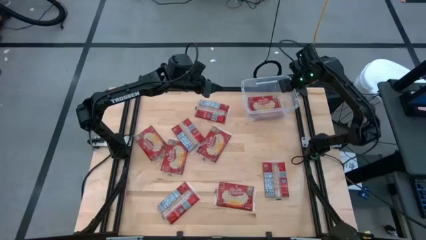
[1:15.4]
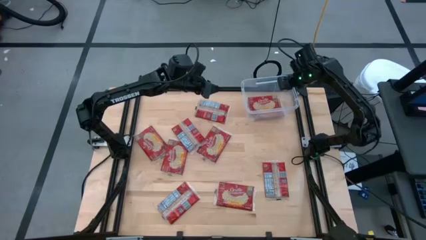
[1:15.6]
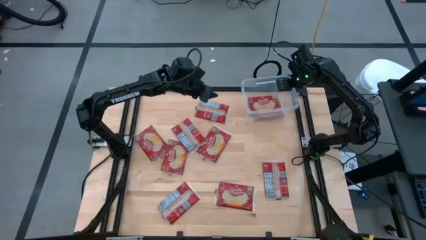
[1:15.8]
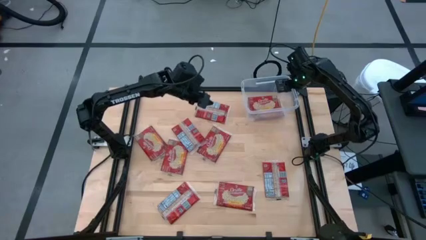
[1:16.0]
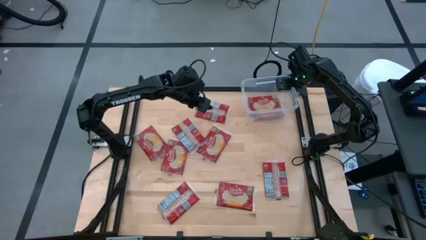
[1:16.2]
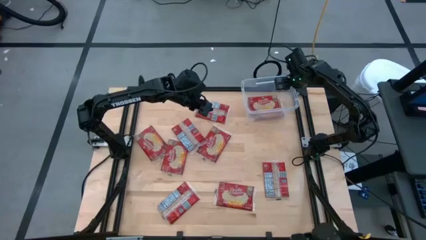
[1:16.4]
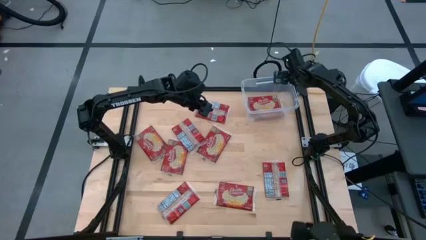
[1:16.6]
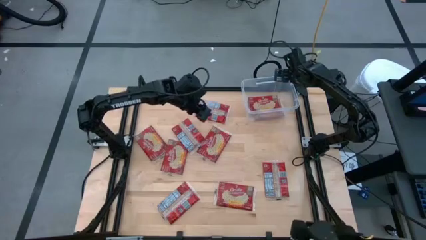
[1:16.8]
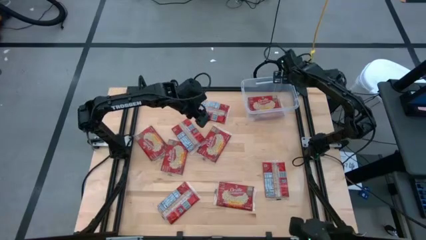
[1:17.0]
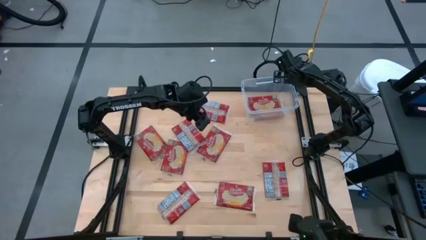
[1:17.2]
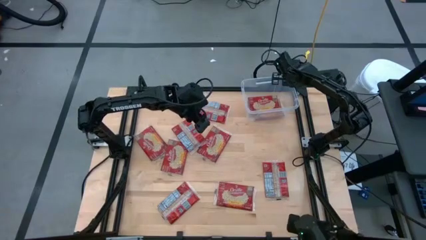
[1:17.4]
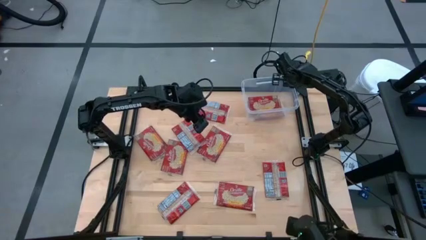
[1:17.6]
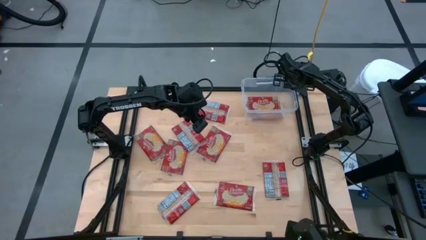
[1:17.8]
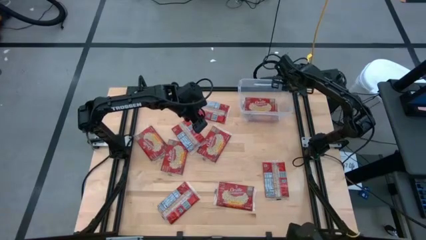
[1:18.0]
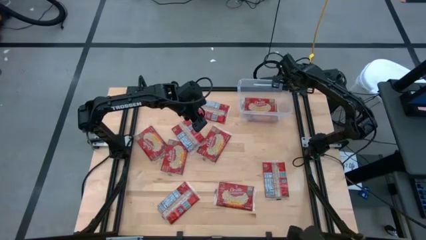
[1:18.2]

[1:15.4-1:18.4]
Task: Sort popcorn bags into baskets
Adjust the transparent container

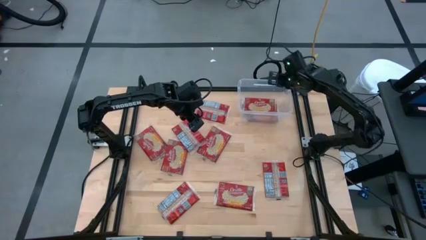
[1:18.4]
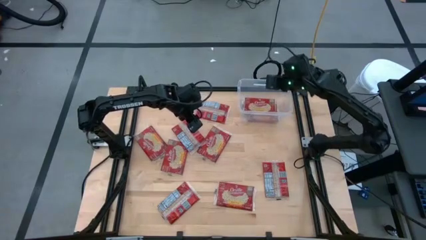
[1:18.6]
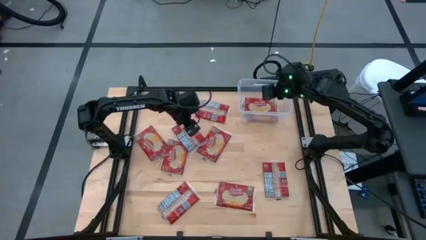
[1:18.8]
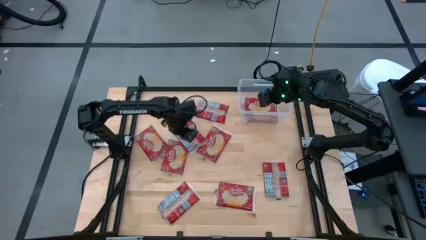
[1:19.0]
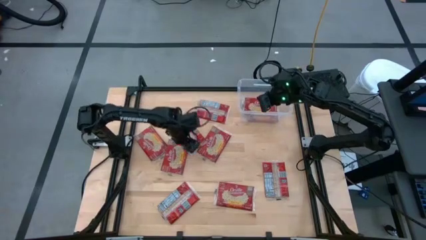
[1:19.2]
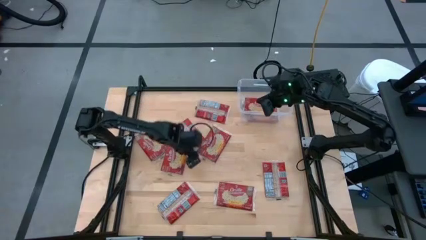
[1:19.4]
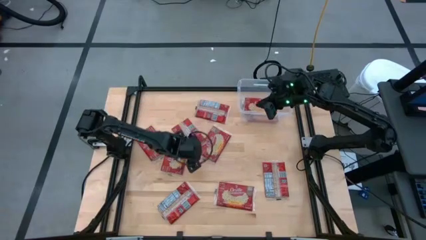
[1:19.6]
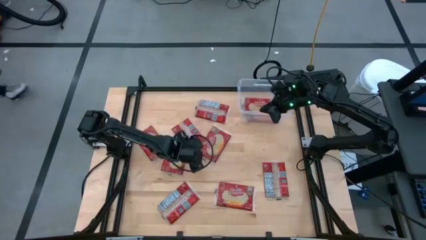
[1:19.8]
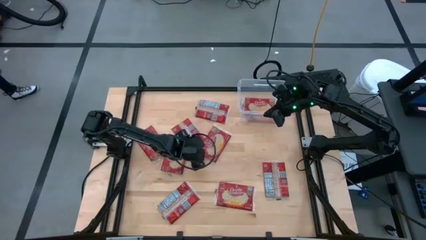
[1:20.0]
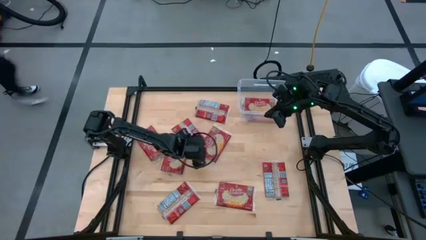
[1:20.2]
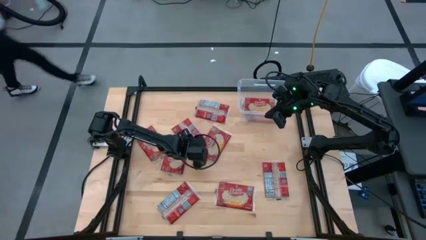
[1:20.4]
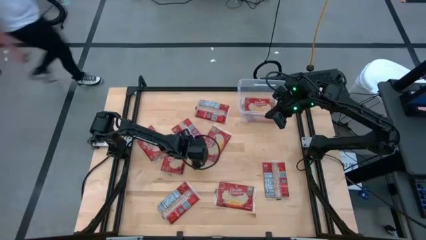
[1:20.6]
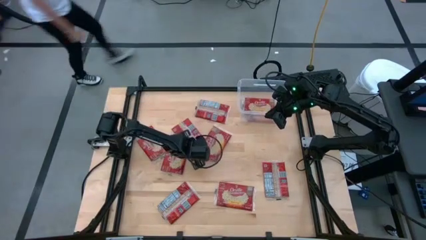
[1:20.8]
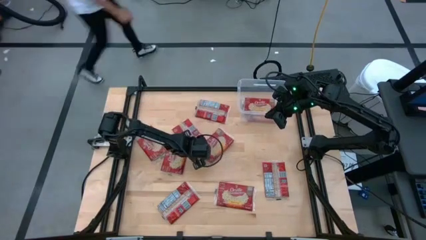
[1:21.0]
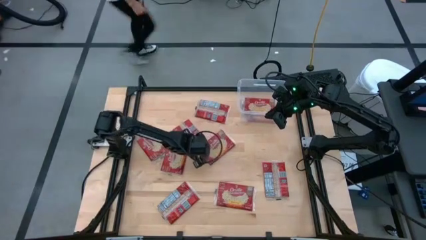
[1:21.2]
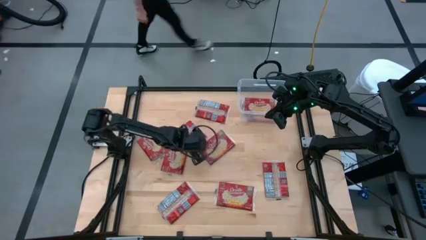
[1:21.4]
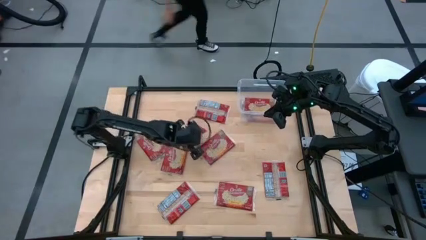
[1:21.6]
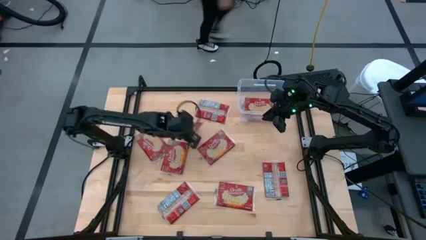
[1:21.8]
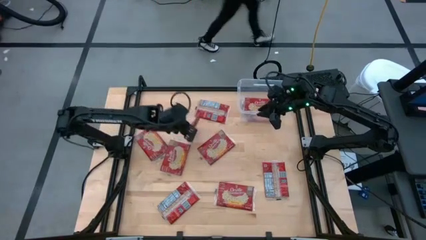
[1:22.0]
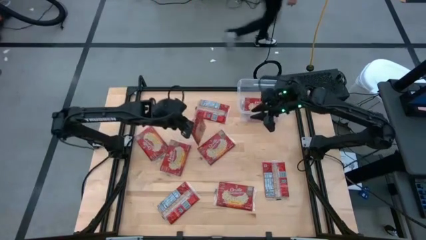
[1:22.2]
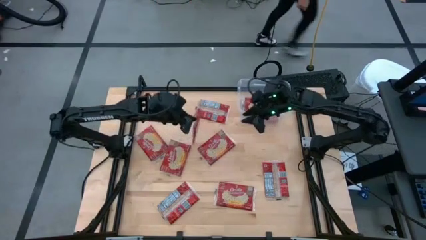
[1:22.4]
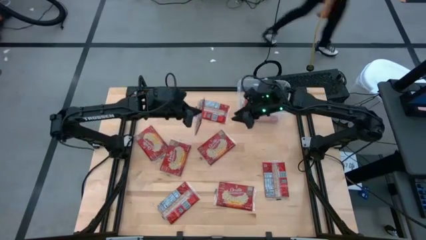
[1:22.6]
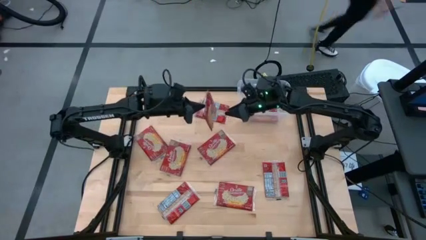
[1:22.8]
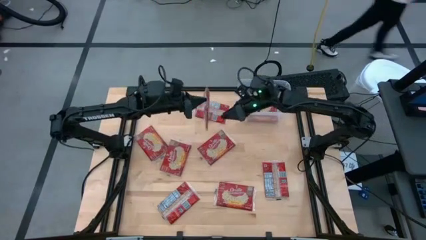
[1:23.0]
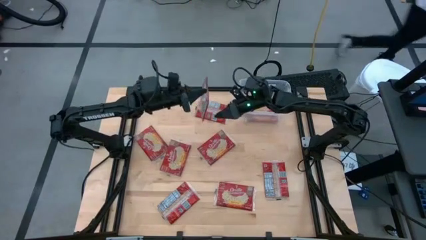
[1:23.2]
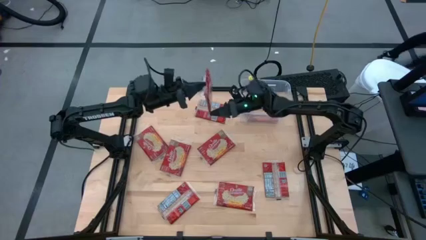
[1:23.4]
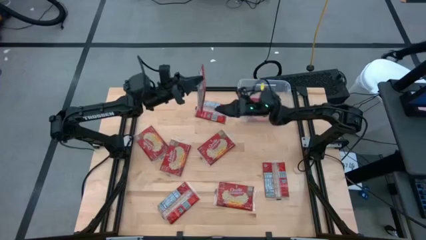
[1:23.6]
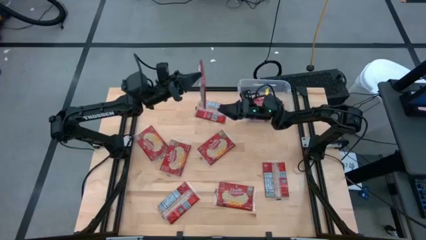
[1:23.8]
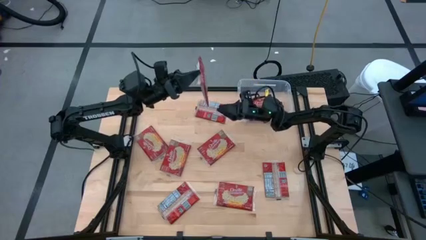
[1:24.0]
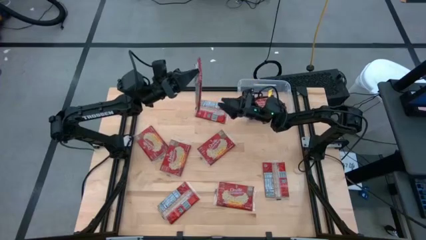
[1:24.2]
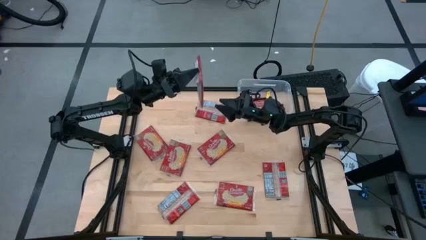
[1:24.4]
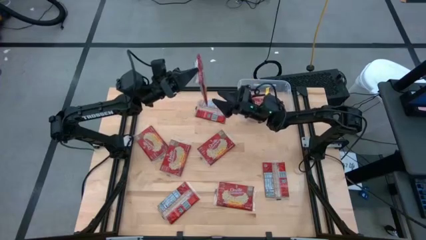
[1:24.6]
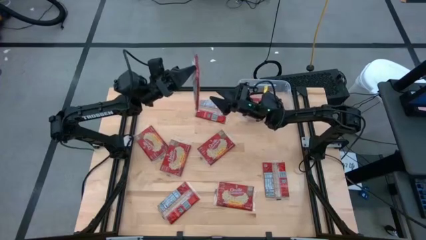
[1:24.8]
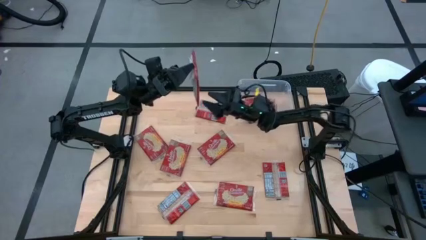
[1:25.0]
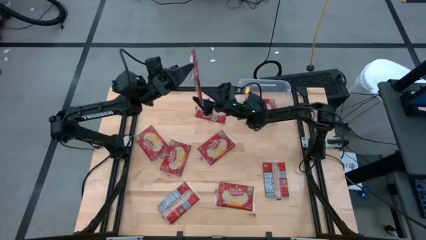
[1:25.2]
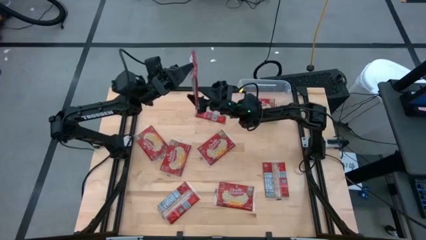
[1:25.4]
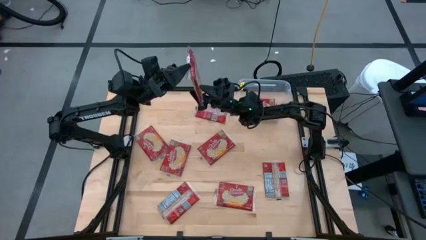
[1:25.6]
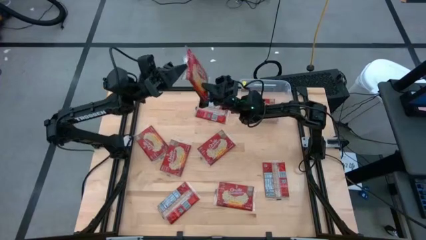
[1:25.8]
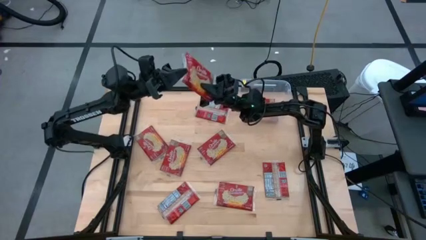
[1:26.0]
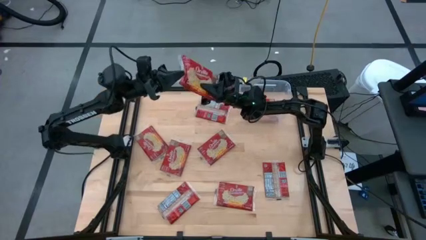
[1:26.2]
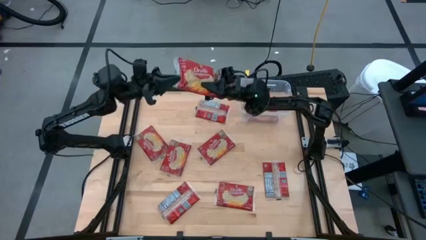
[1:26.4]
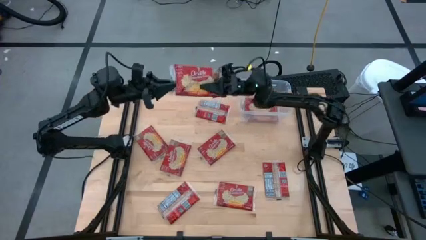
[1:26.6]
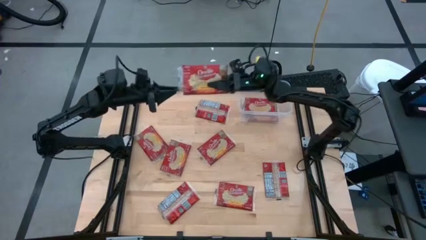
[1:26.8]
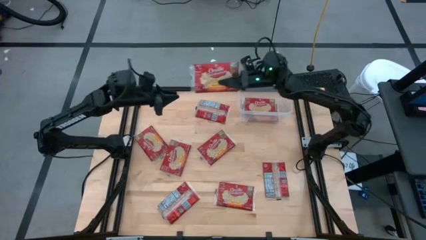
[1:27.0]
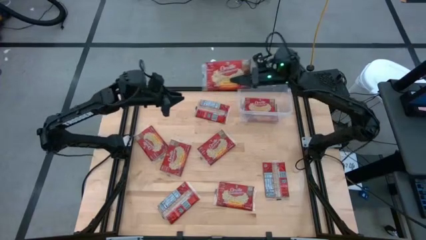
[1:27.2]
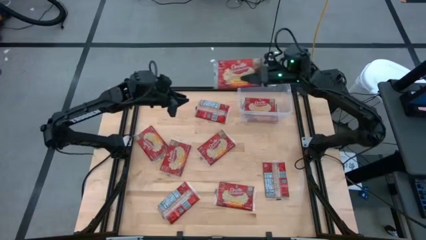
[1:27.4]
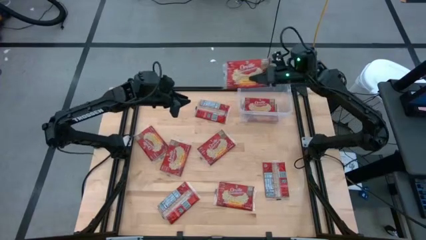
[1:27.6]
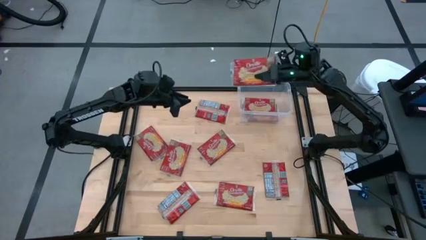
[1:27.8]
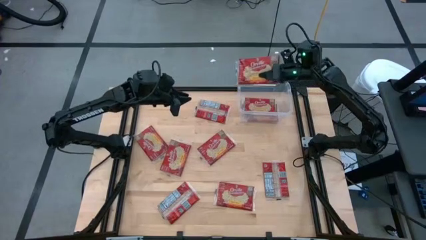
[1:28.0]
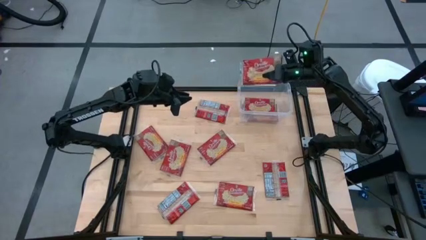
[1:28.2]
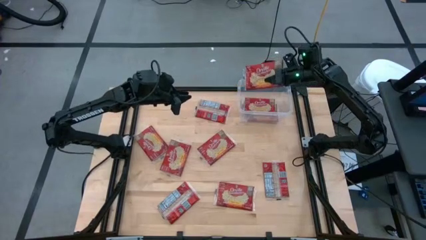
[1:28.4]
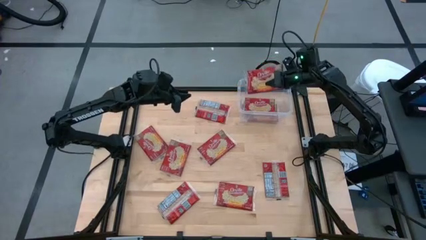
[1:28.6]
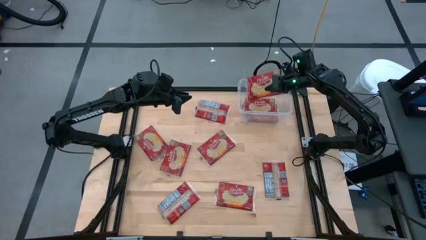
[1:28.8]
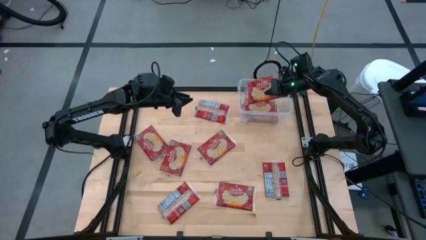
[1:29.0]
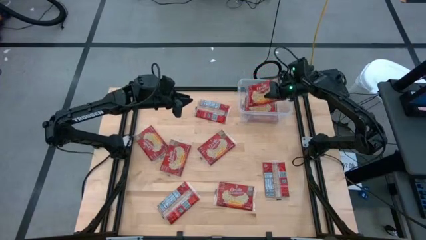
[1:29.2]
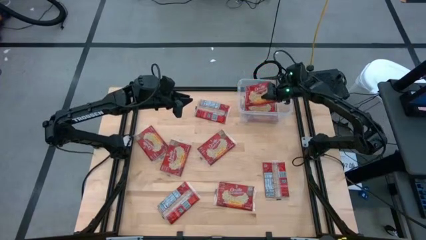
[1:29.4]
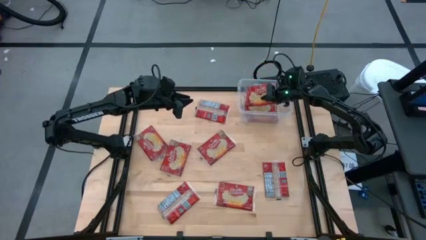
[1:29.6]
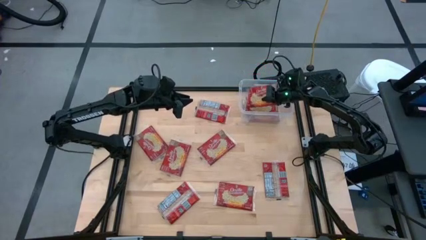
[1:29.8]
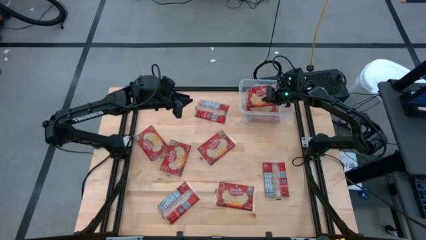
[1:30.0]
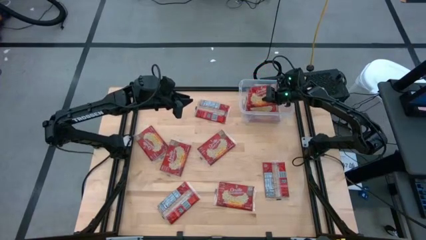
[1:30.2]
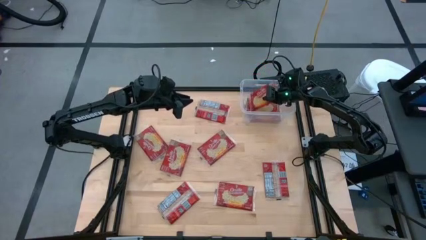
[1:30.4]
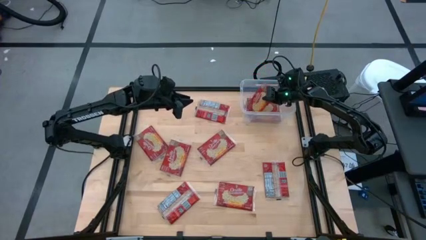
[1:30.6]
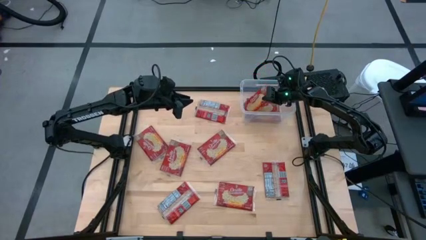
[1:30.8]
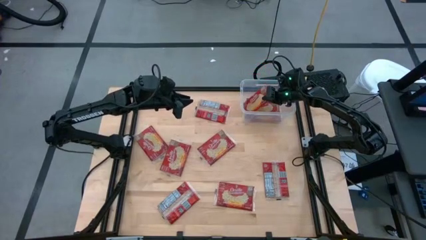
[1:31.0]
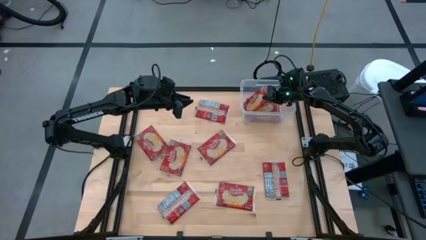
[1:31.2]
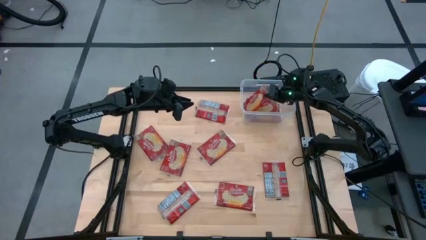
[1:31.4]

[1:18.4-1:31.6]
Put the popcorn bag into the transparent container
